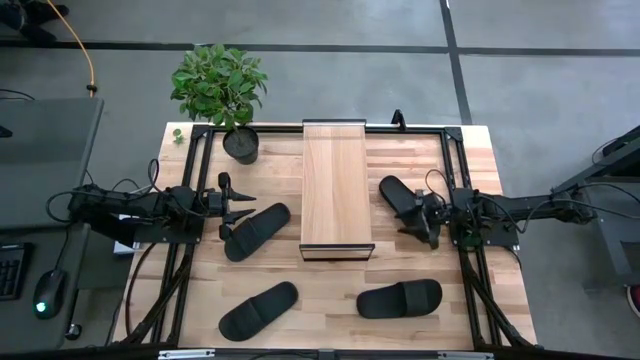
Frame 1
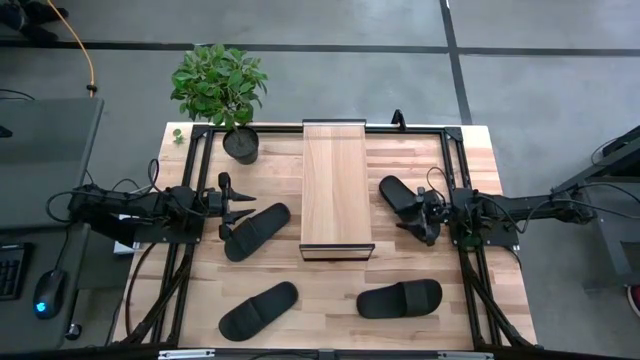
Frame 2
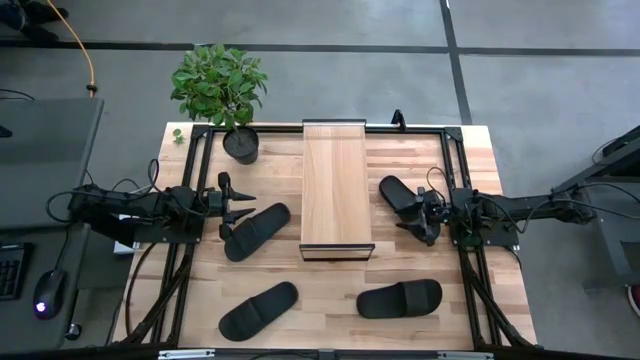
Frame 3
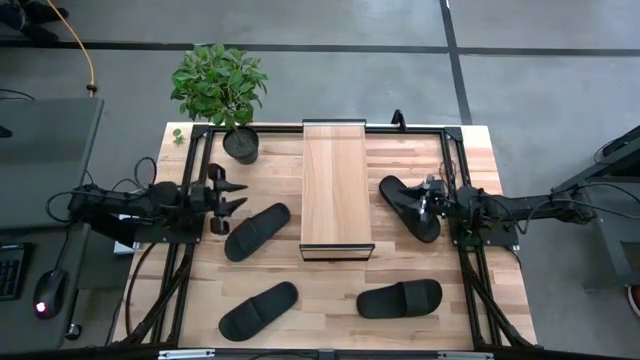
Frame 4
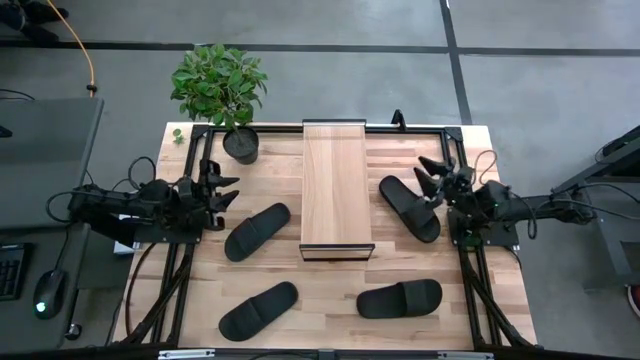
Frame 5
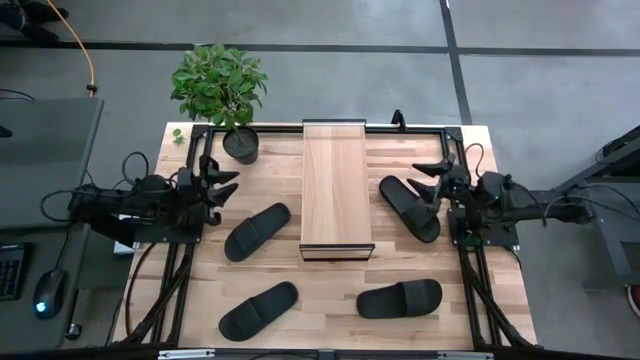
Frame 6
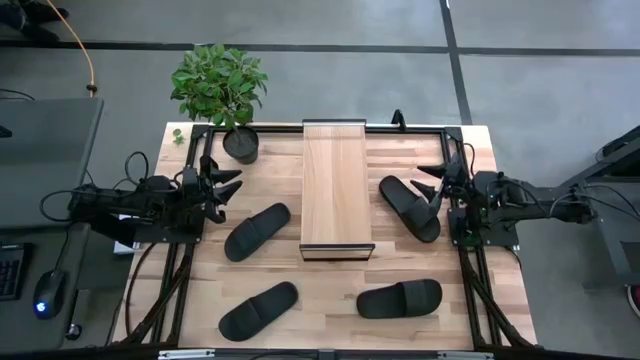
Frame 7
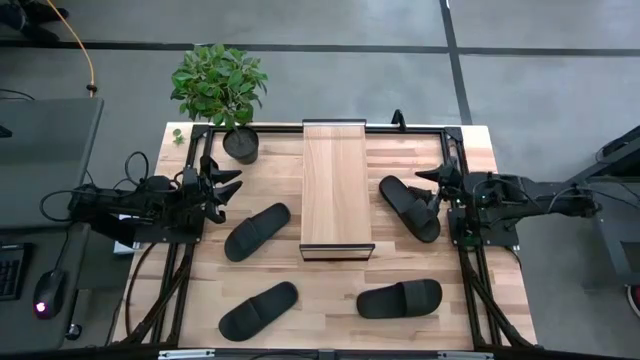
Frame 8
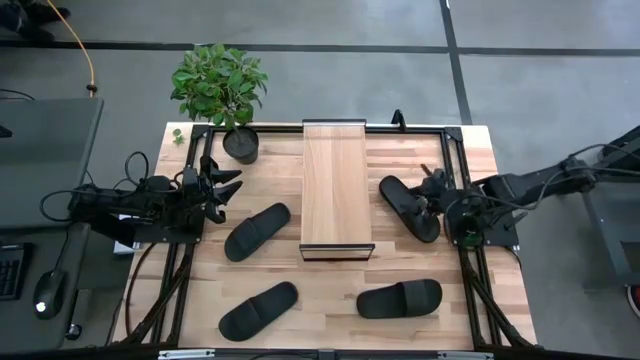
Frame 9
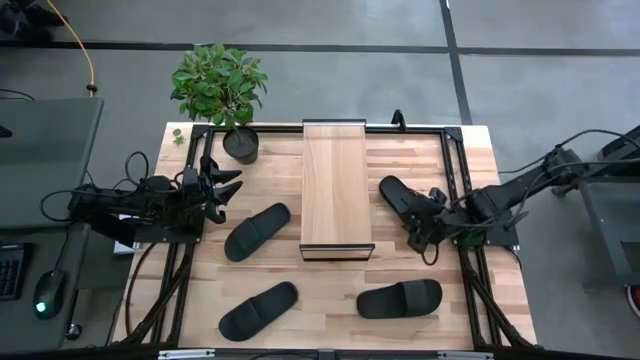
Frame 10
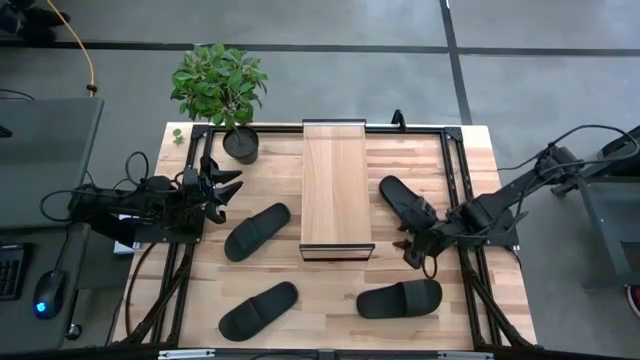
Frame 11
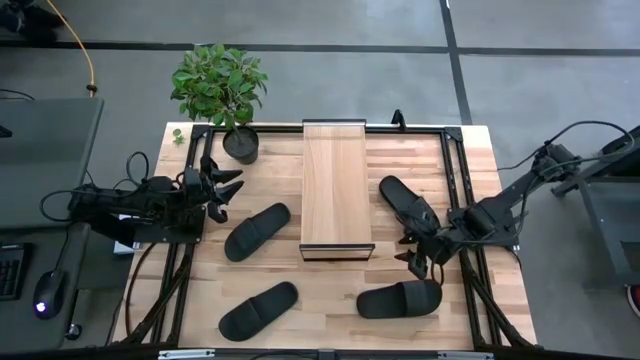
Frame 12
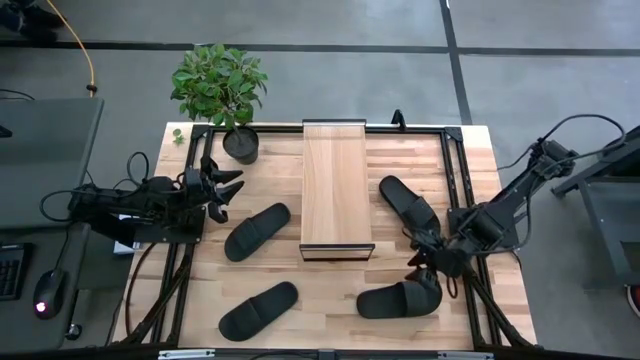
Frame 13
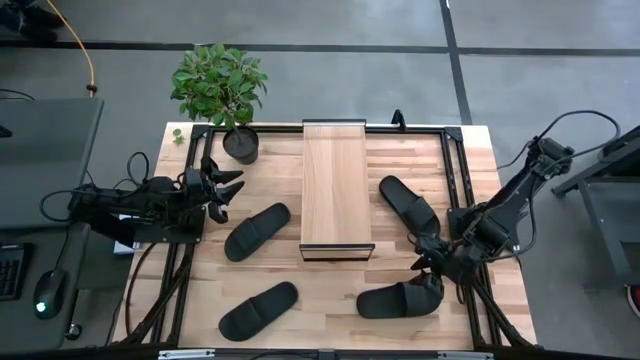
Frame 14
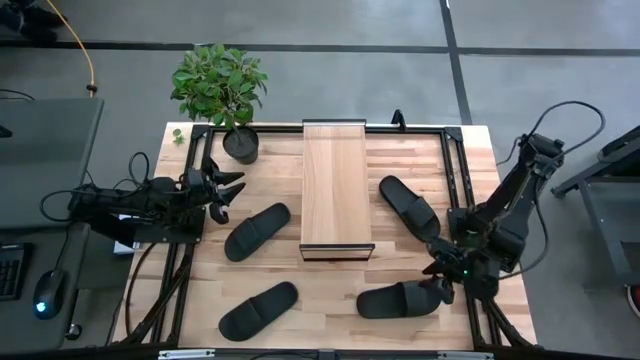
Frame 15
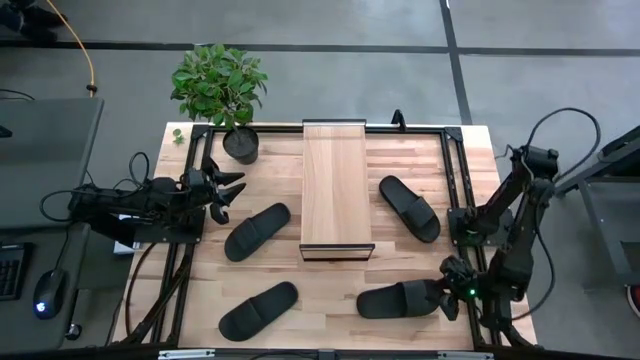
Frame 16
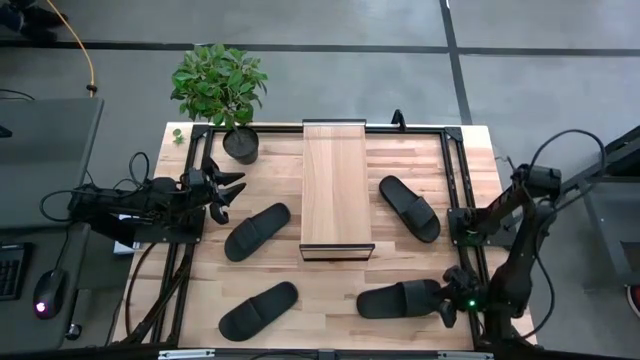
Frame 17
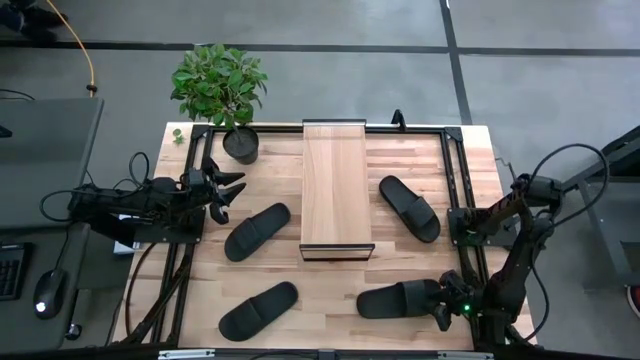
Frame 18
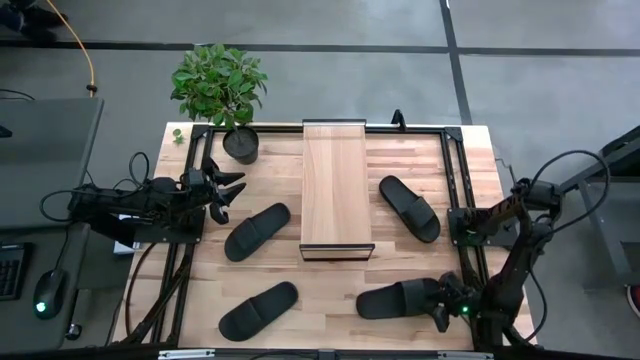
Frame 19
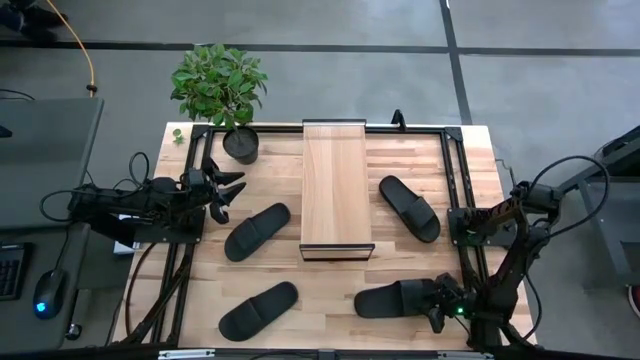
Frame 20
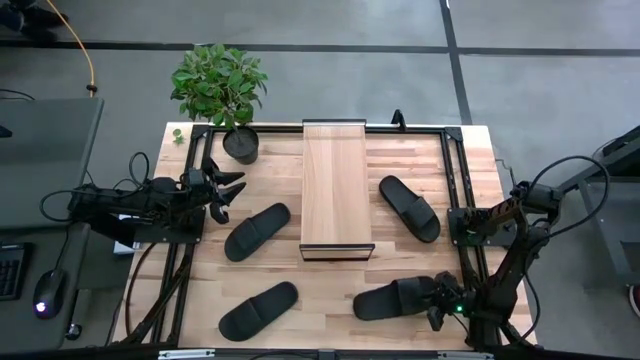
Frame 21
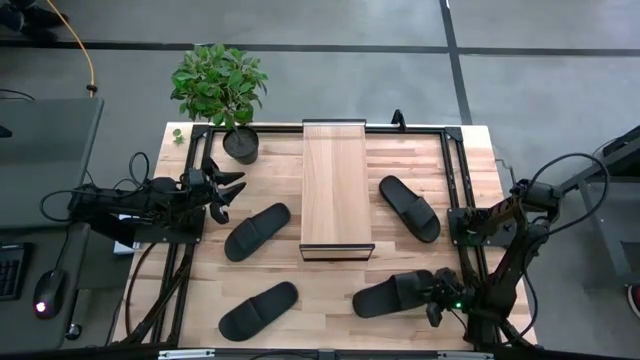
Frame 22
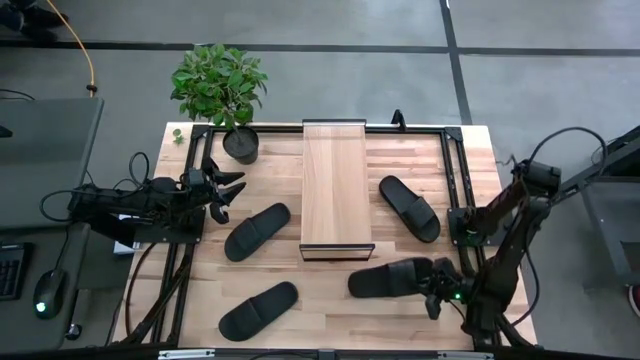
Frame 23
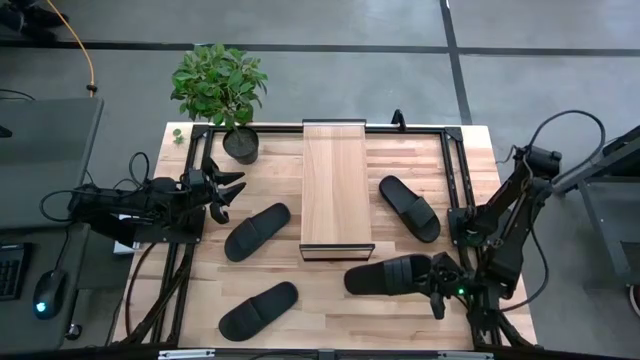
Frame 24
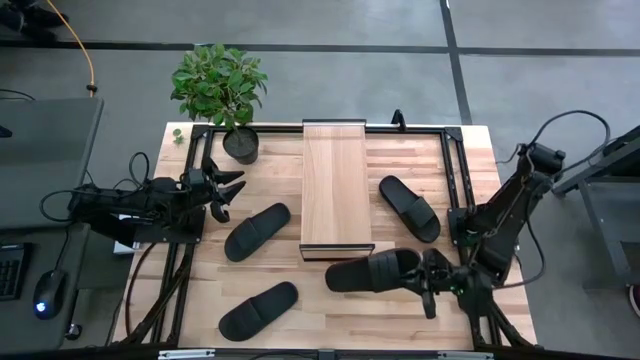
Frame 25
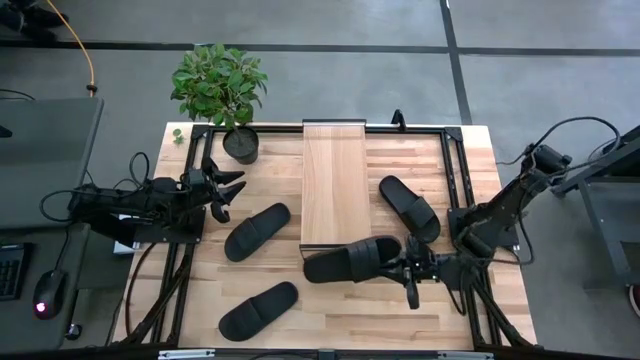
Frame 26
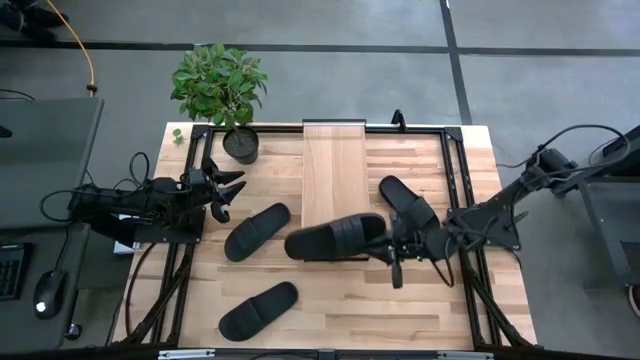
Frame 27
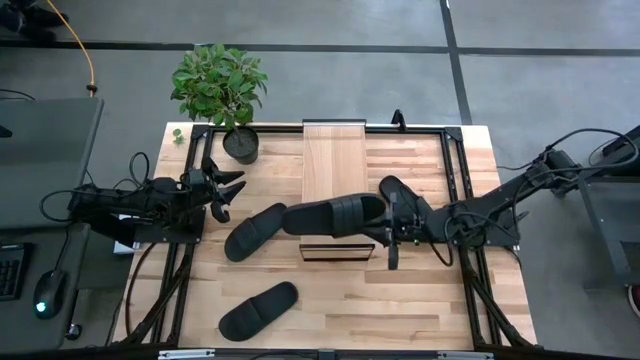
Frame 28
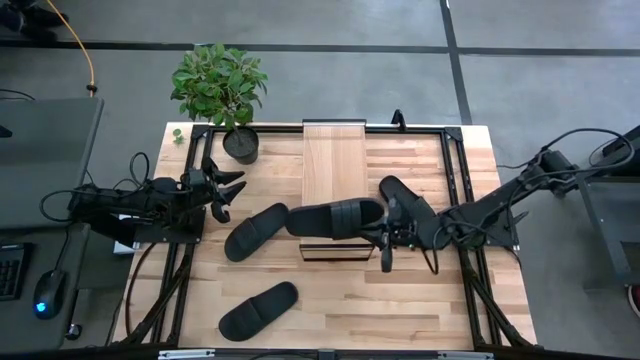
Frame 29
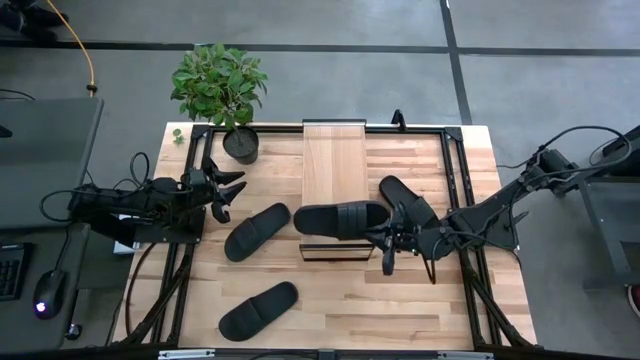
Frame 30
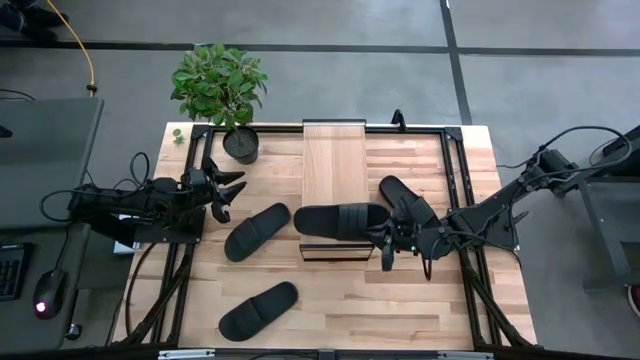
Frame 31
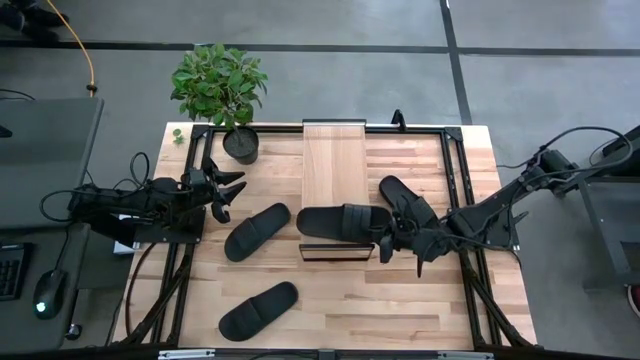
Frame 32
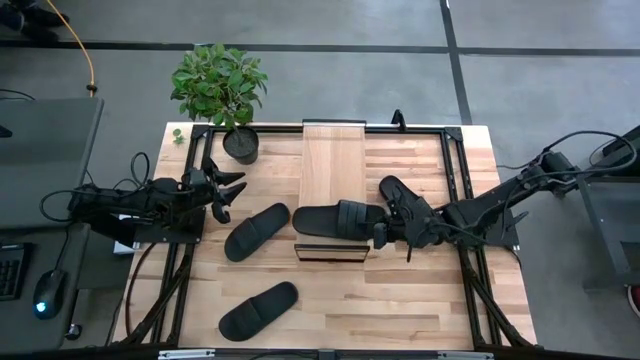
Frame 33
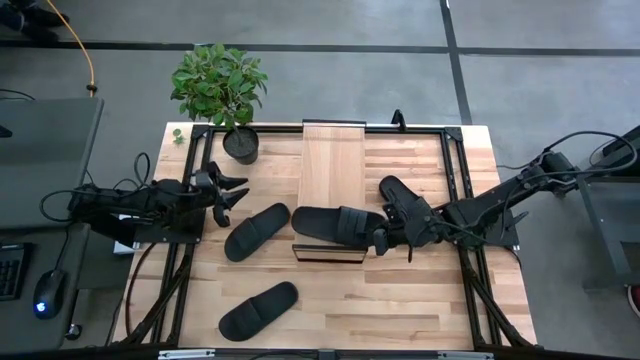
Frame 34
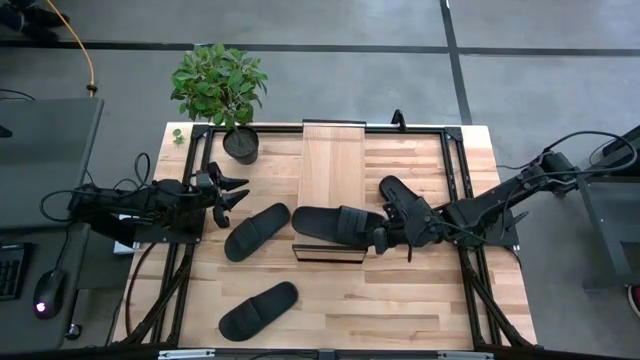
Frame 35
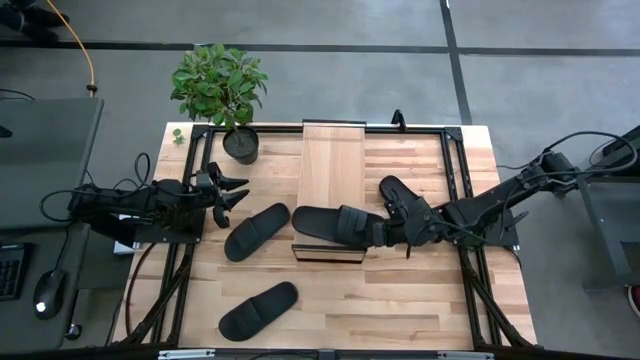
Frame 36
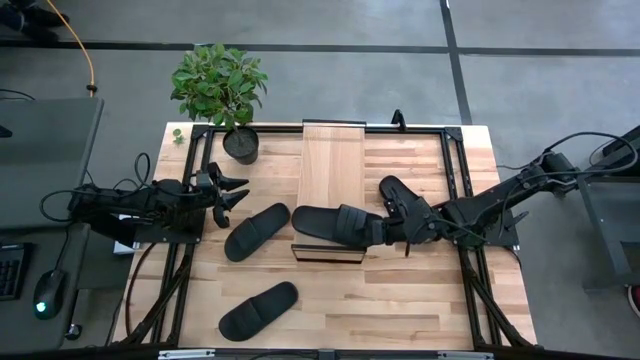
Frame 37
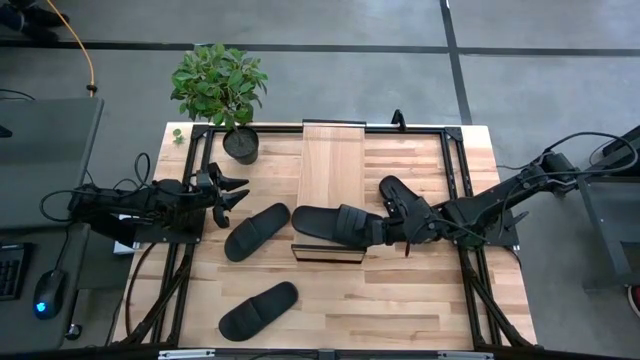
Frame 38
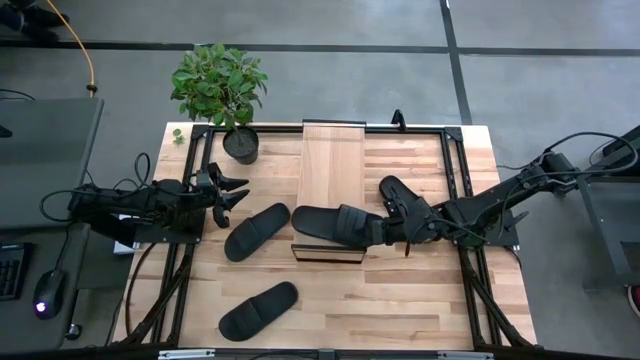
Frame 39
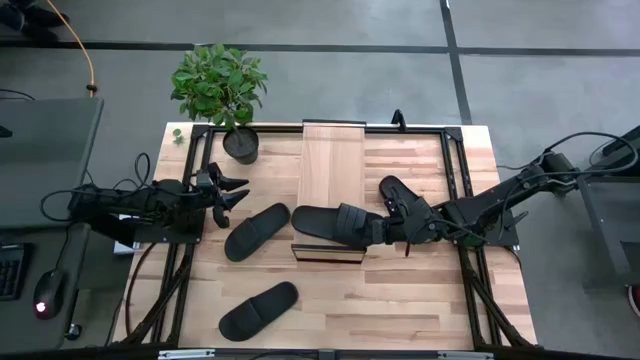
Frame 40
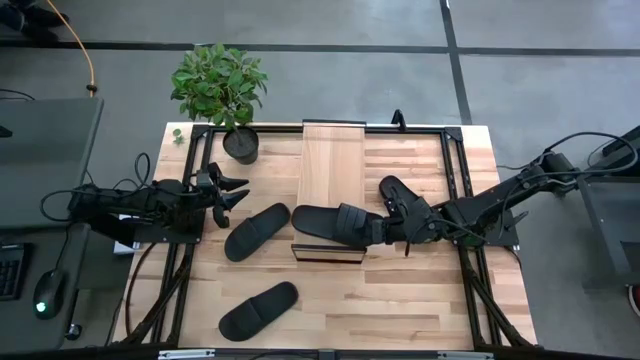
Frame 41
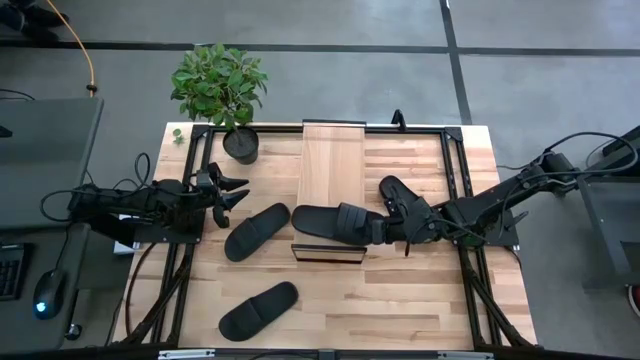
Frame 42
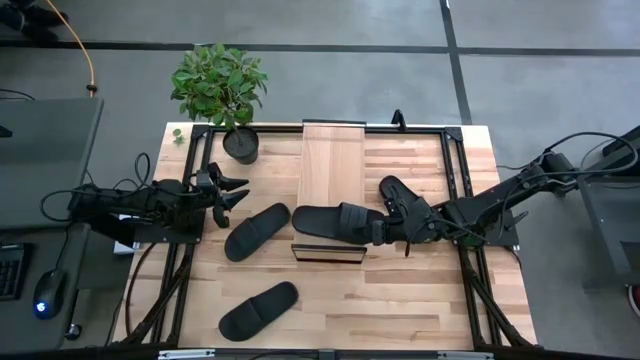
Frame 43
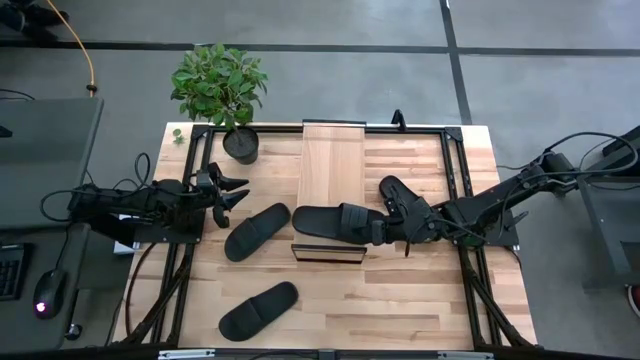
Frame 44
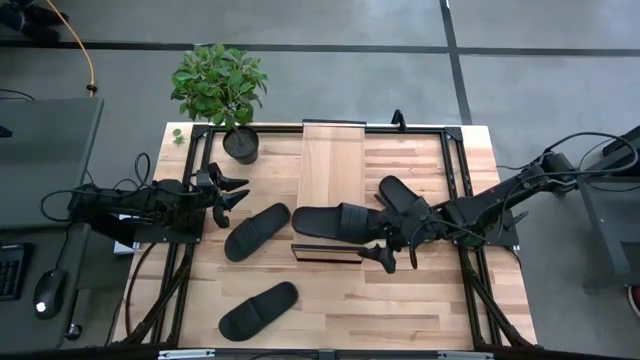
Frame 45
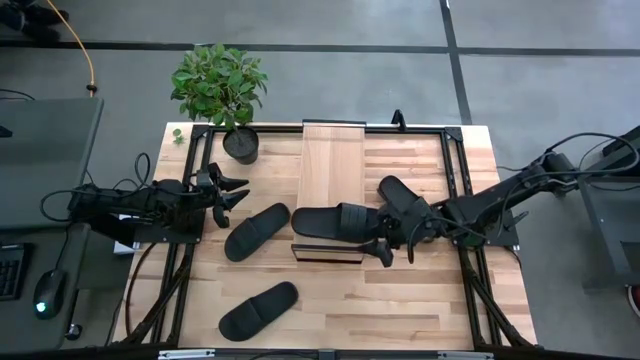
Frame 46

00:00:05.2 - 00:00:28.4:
Task: Pick and place slides into the shelf
Put the black slide on the shelf
